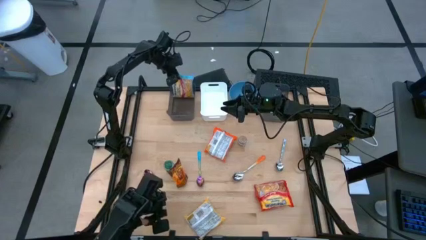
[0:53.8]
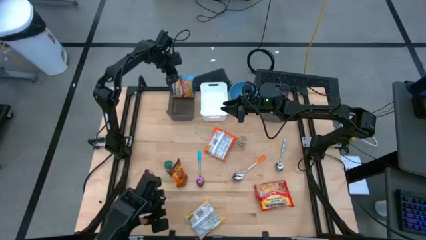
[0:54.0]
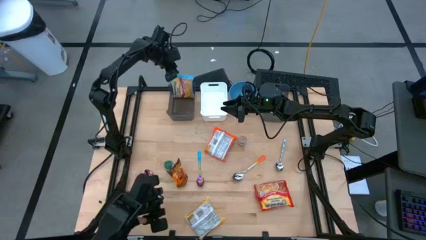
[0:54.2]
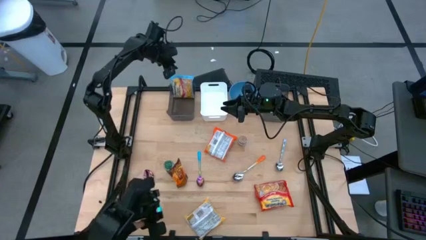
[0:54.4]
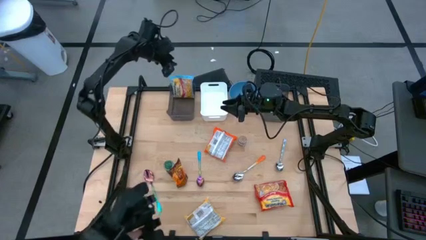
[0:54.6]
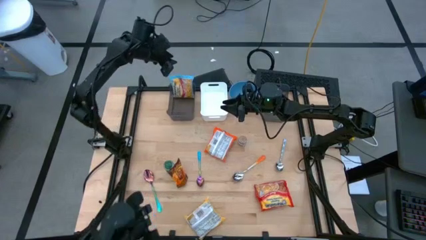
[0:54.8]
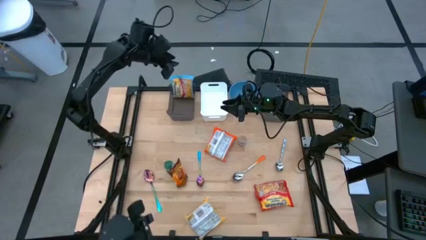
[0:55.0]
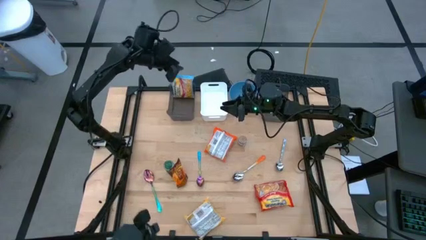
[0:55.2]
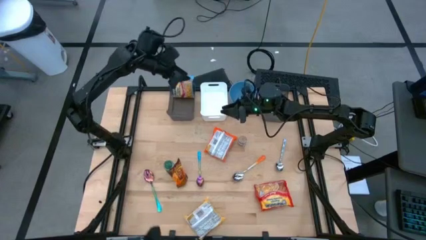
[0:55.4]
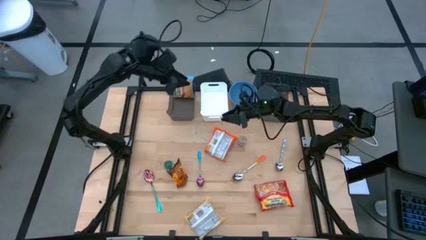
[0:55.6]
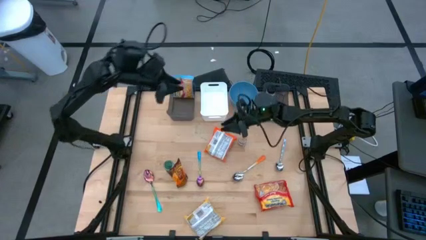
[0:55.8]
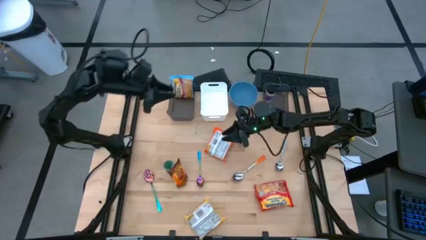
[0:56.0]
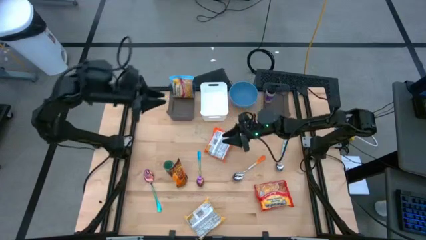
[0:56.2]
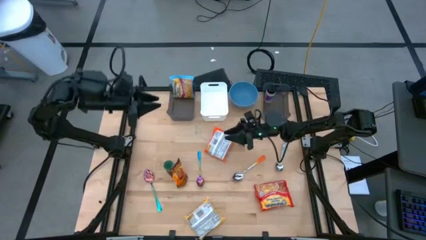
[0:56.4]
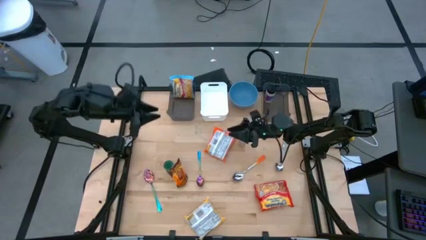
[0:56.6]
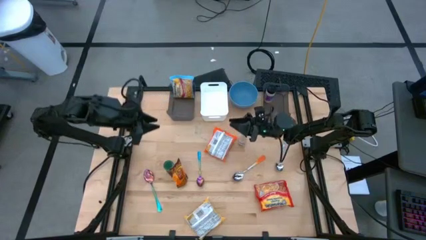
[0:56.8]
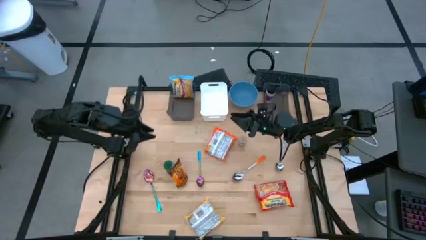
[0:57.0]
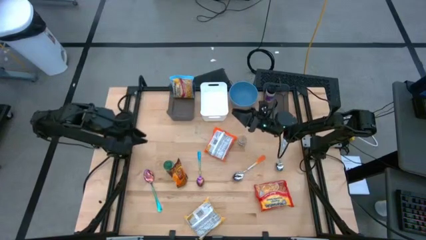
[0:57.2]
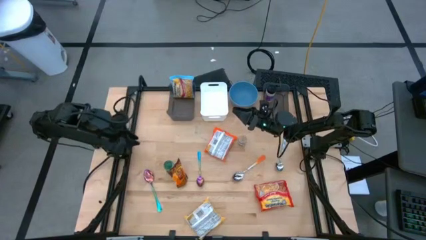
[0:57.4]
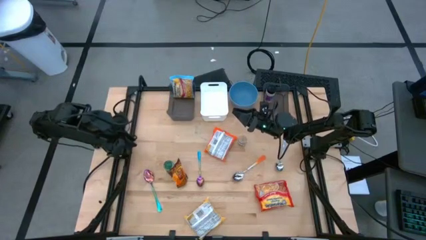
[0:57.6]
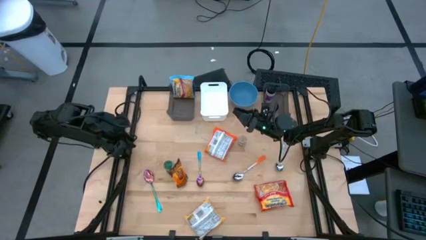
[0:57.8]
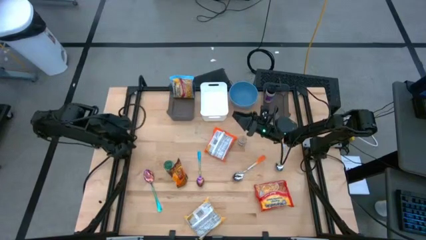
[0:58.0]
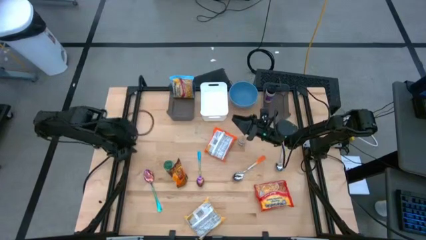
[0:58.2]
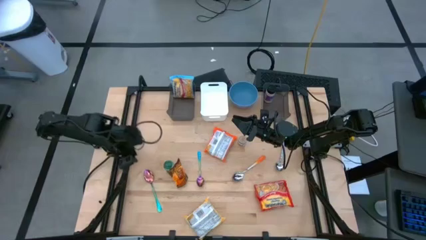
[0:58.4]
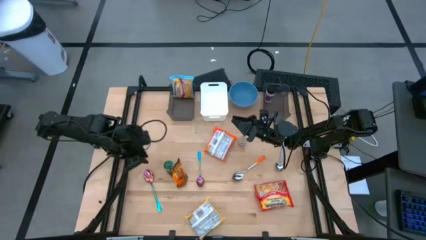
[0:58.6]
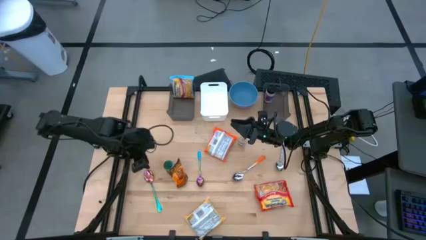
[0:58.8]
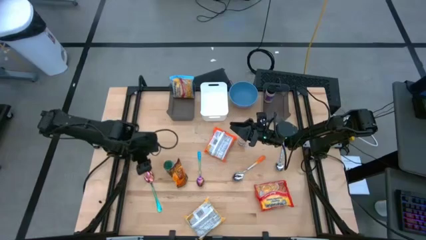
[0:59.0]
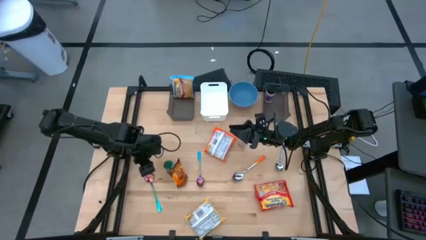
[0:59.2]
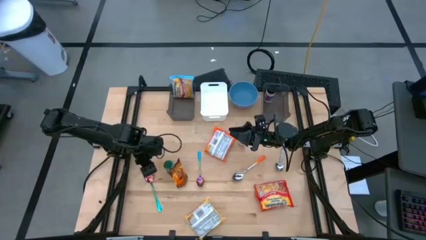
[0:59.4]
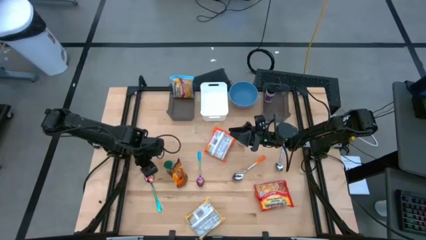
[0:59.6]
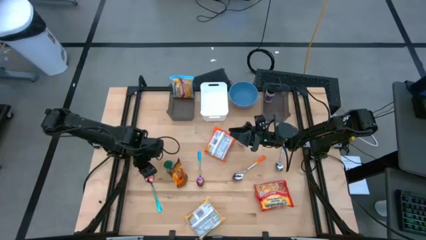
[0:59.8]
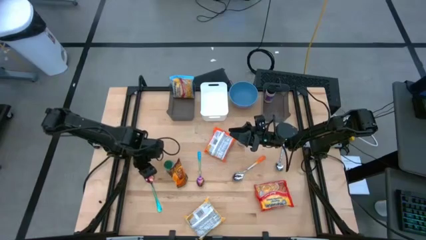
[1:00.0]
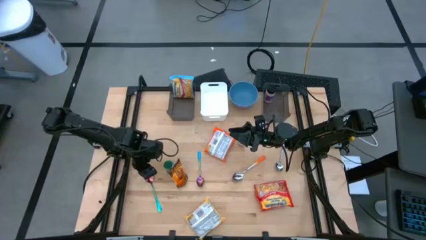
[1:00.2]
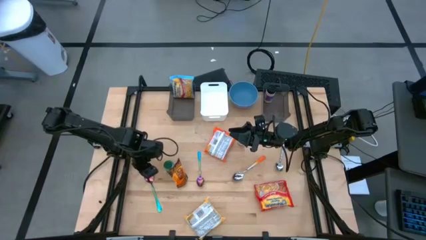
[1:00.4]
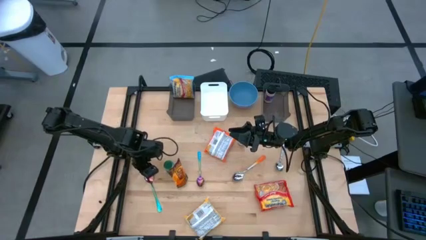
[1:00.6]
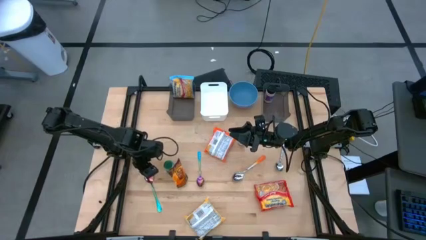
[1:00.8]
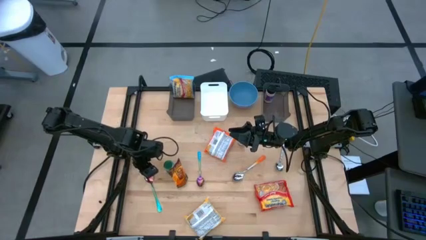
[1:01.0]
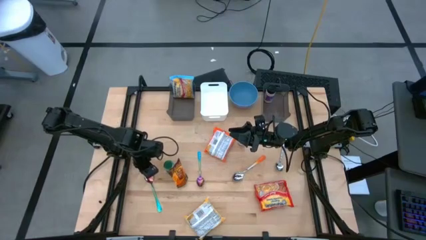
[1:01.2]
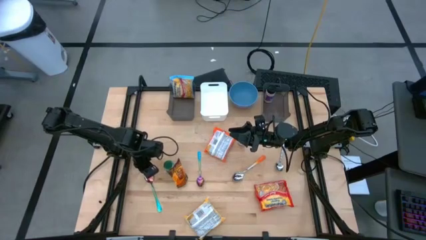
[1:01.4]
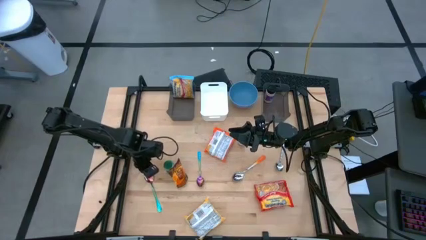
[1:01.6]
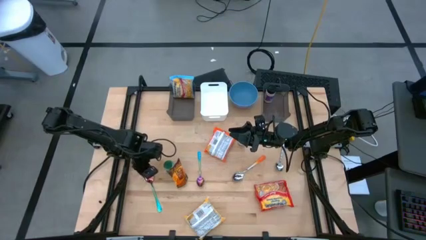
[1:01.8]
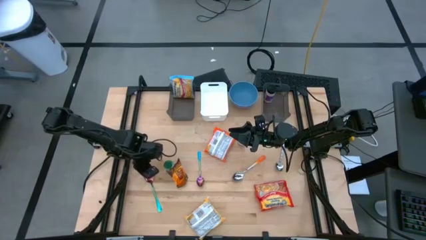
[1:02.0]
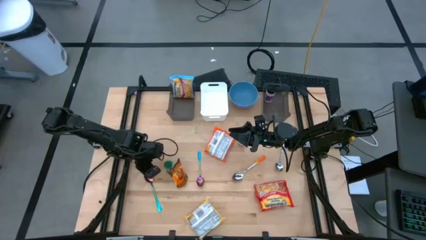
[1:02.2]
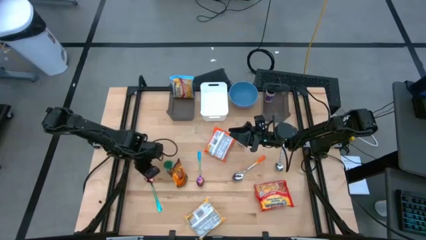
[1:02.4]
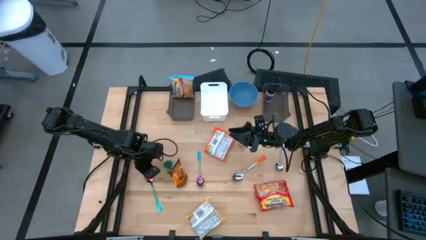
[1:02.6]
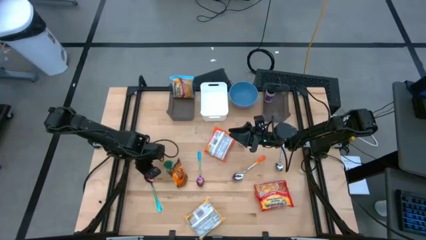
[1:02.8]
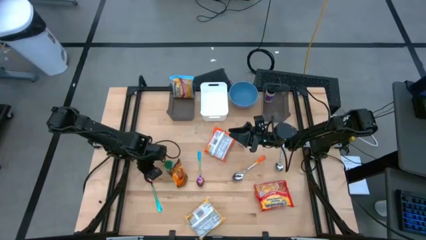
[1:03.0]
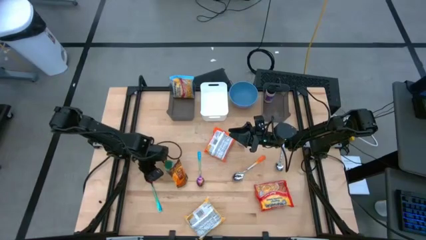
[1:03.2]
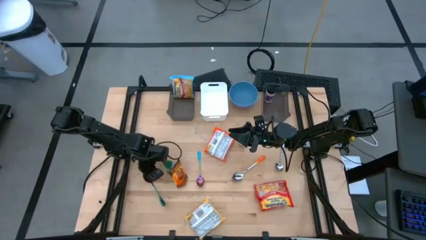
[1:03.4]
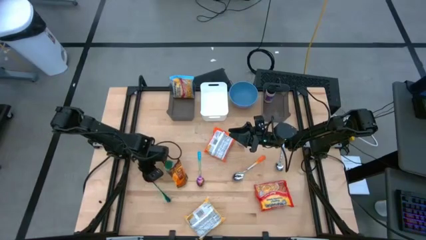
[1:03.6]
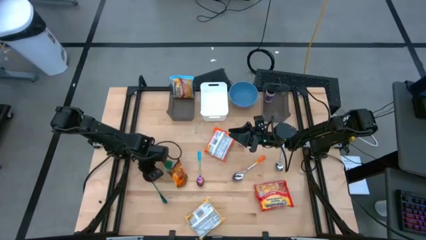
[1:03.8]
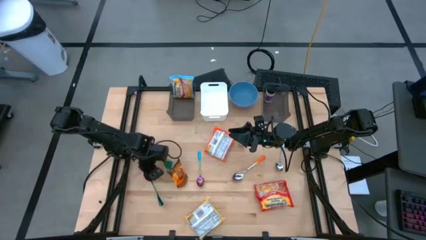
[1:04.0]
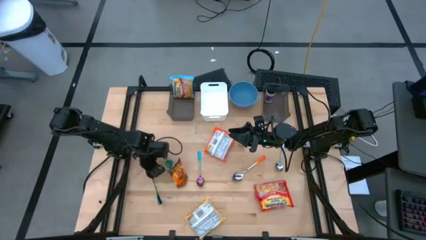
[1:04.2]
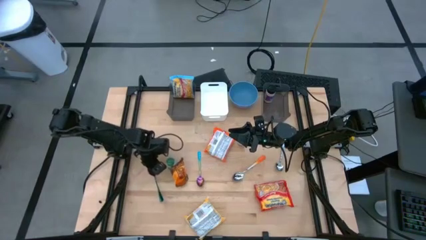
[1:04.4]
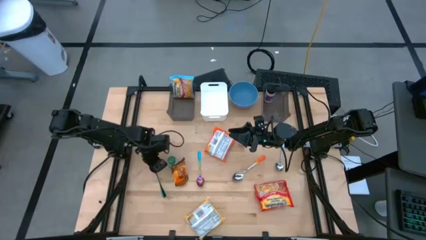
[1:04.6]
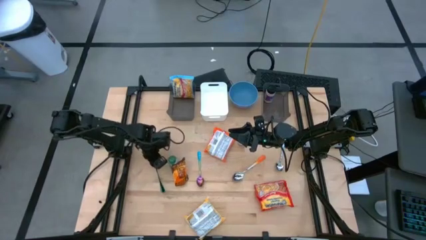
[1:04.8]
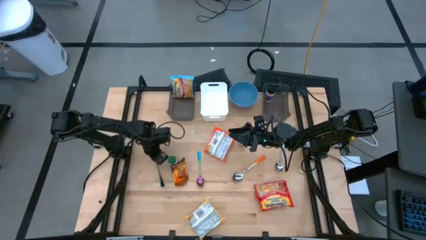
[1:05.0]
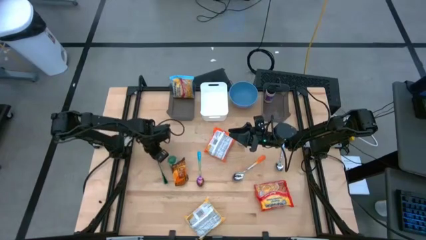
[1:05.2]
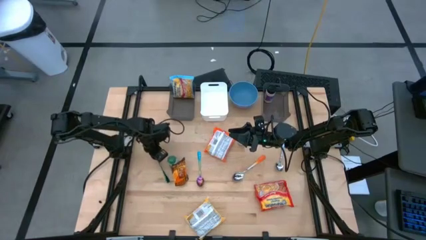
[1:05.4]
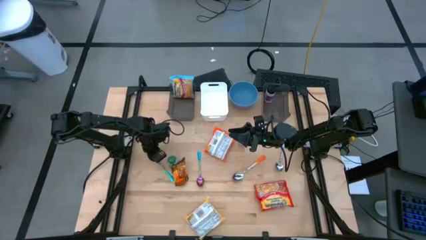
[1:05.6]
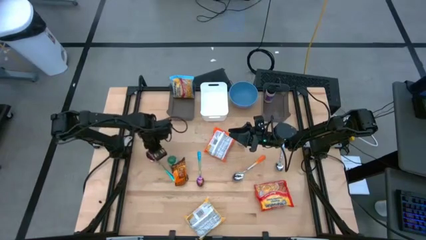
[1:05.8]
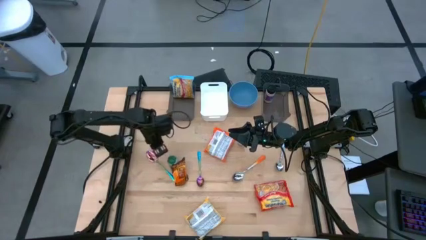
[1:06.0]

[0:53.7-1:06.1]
Task: Pick & Place Food Item
Put the left blue spoon into the white bin

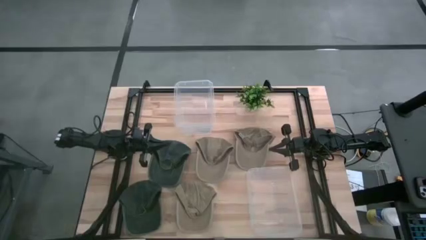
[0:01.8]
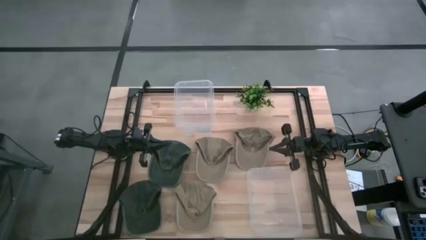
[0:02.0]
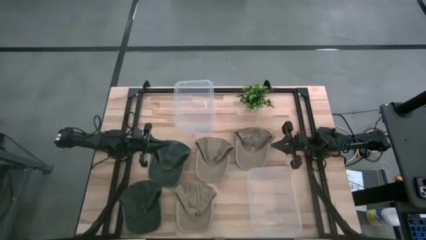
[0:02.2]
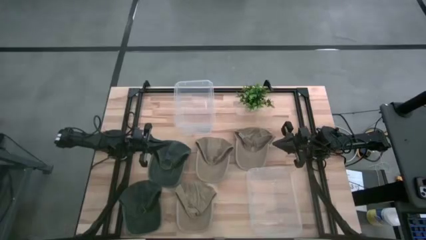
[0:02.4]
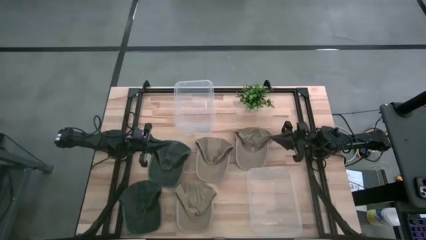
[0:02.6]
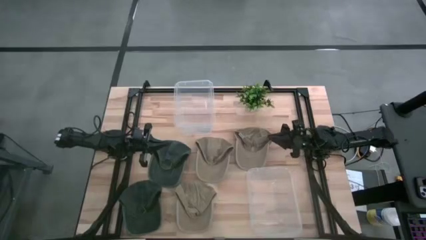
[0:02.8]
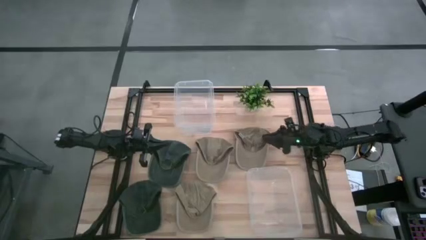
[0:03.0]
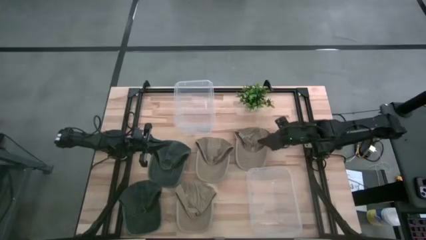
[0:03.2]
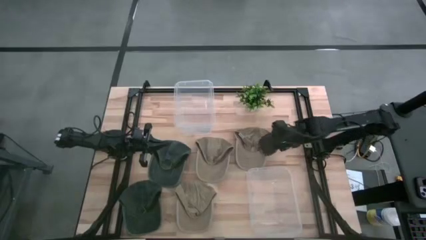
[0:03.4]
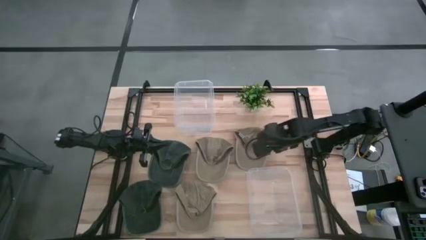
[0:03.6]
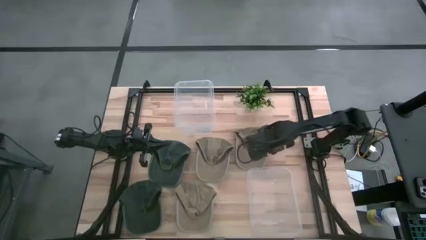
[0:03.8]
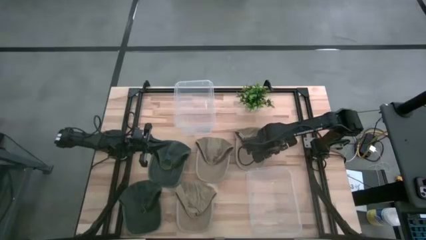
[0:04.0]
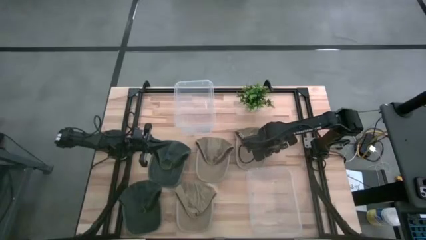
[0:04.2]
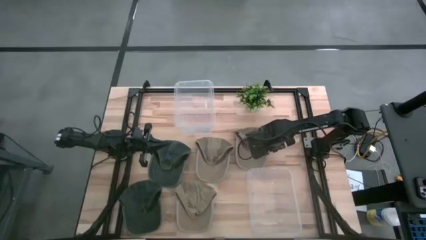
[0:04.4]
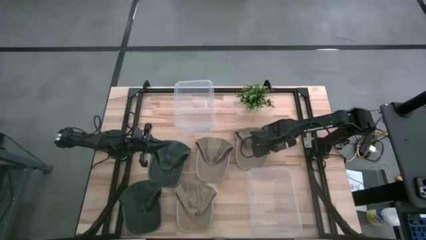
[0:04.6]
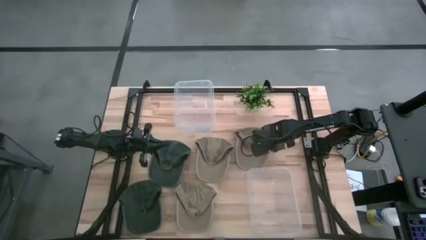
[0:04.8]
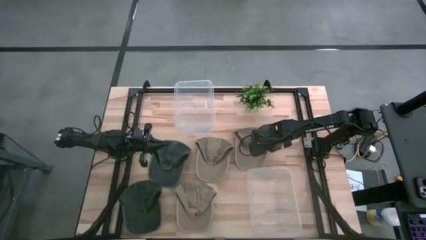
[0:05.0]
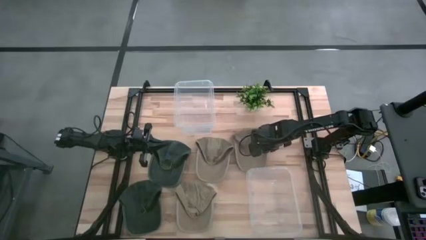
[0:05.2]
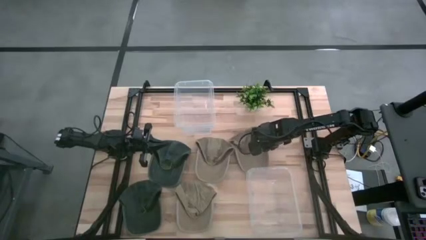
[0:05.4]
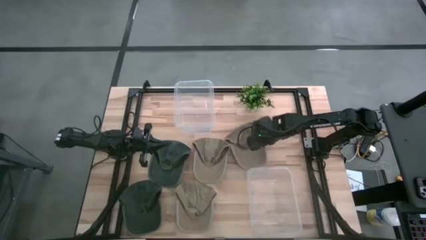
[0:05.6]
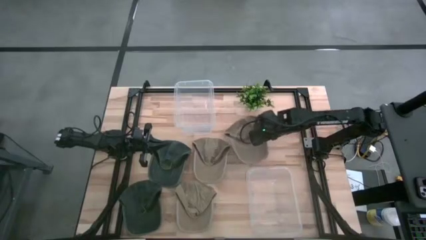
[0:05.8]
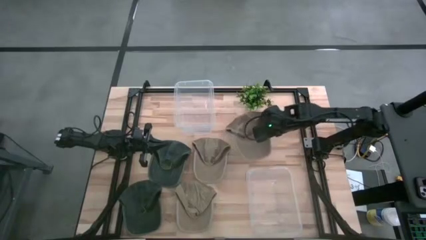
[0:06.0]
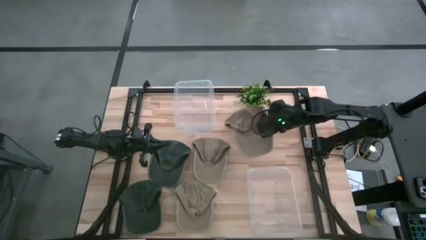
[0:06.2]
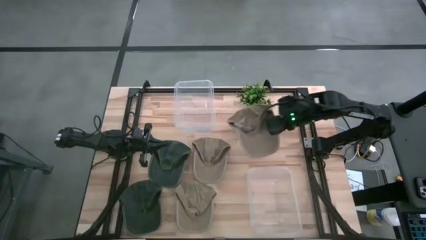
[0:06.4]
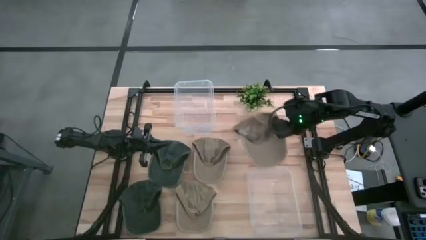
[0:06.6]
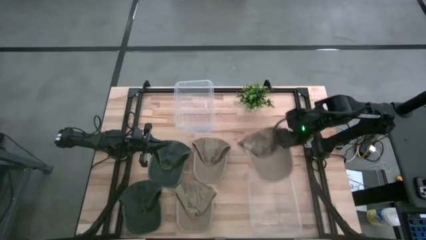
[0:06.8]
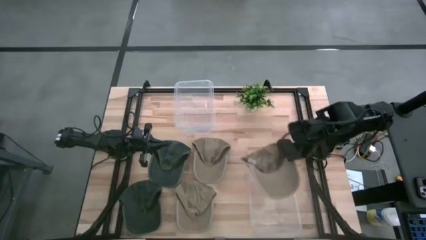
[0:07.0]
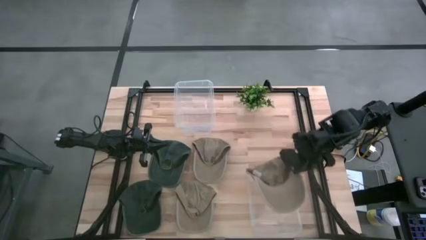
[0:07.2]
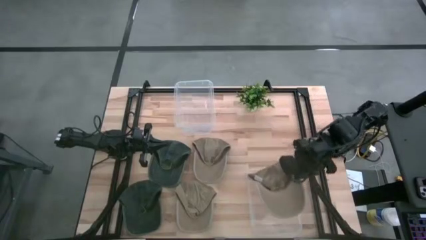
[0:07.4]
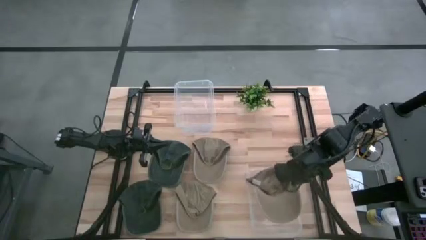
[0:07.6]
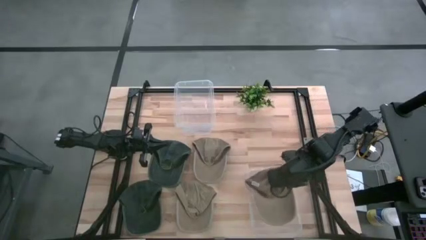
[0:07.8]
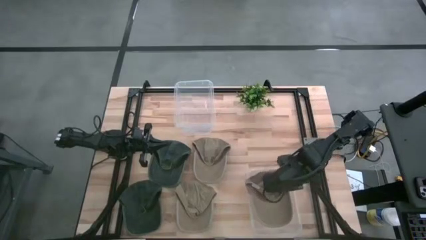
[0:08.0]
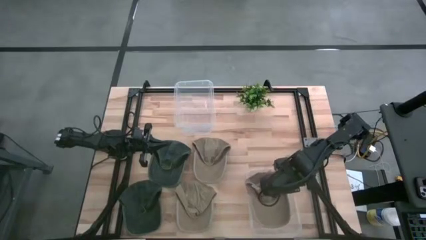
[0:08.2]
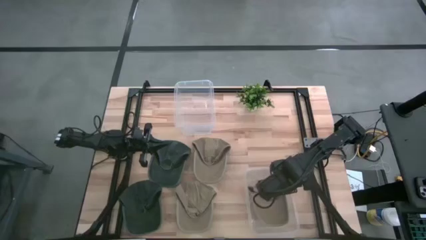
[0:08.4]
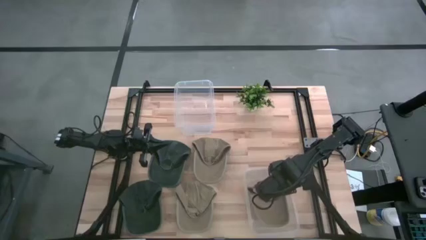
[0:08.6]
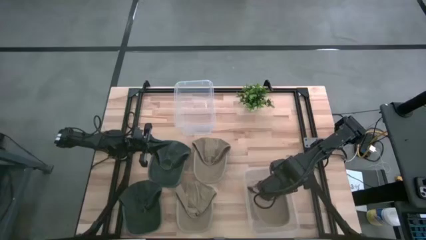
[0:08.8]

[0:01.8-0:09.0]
Task: Pick & Place hat
Put the top right brown cap into the top transparent bin
